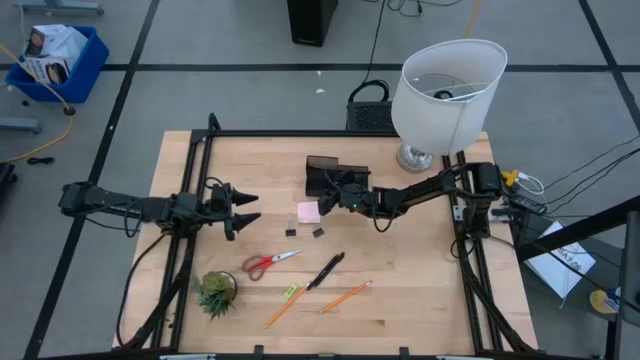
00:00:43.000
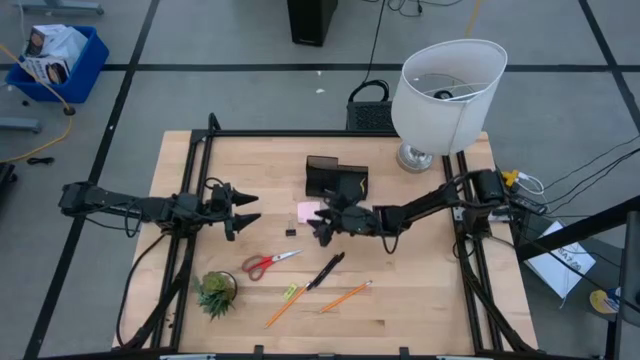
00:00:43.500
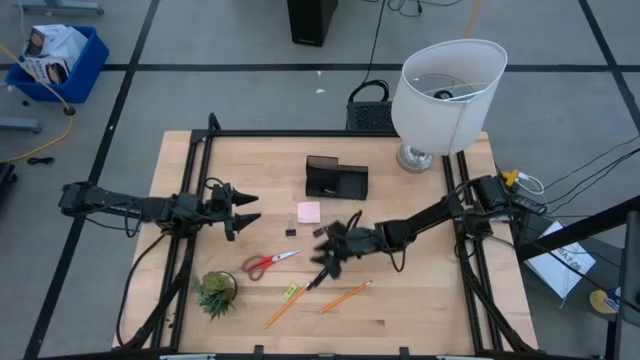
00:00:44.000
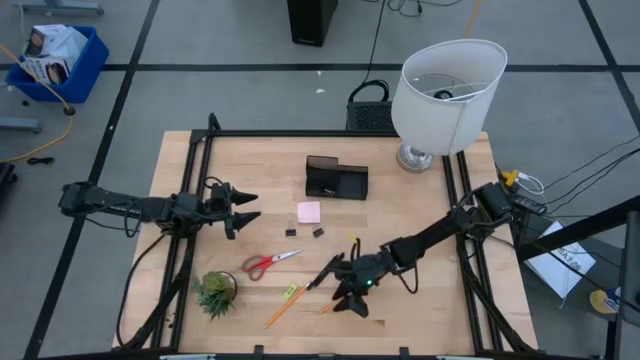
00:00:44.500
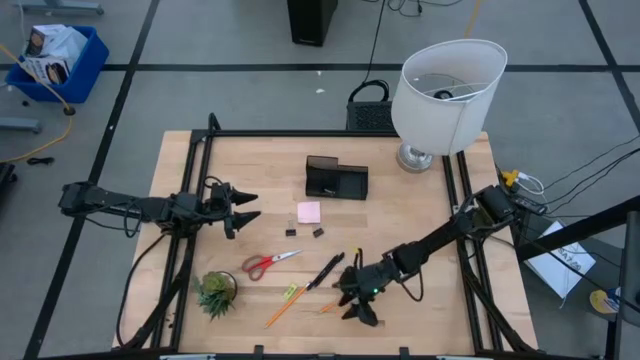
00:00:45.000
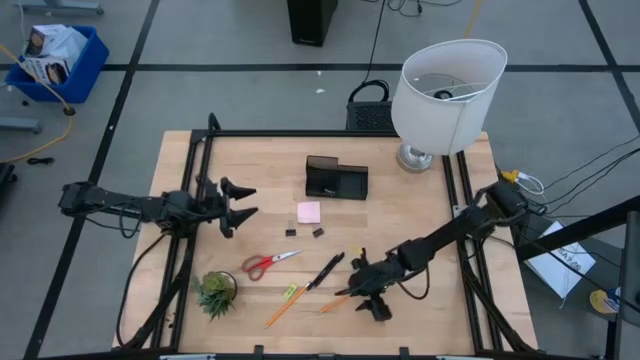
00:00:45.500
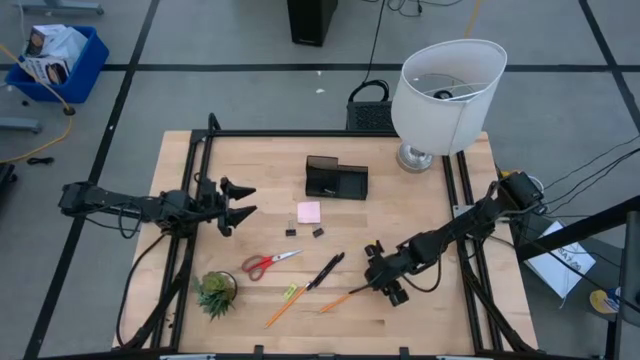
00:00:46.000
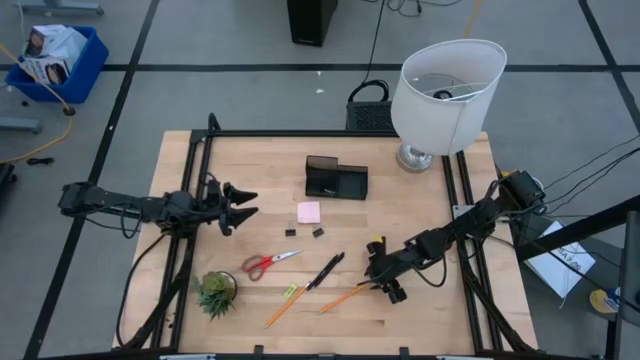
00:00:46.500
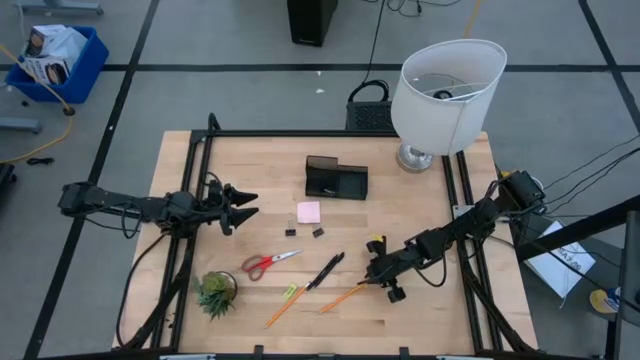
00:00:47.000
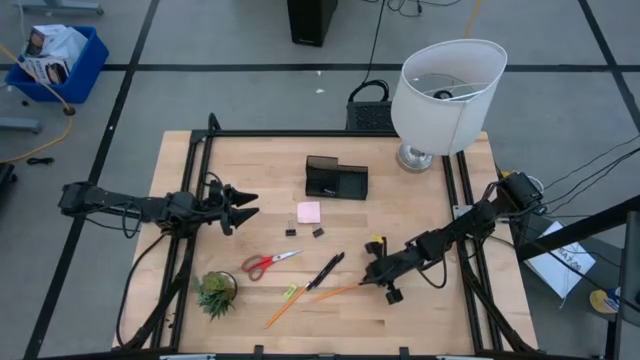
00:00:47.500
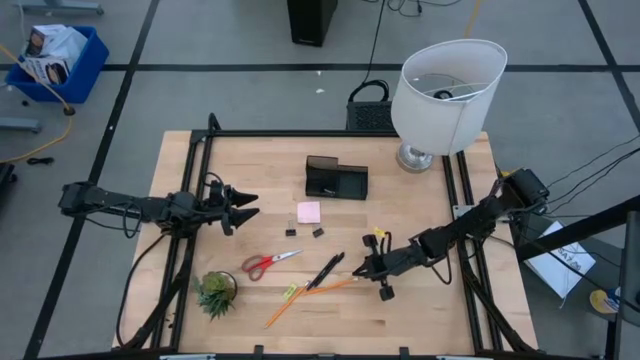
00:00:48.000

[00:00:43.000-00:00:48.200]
Task: Pick and place office supplies into organizer
Put the right yellow pencil into the desk organizer

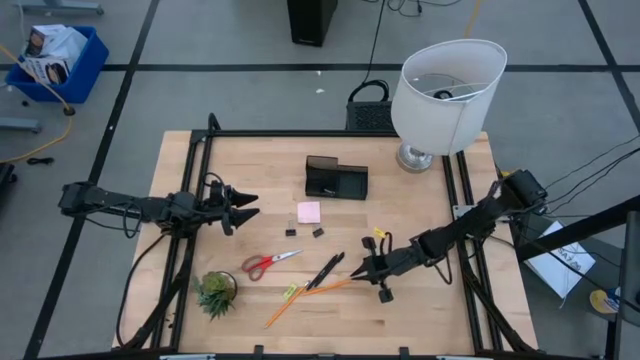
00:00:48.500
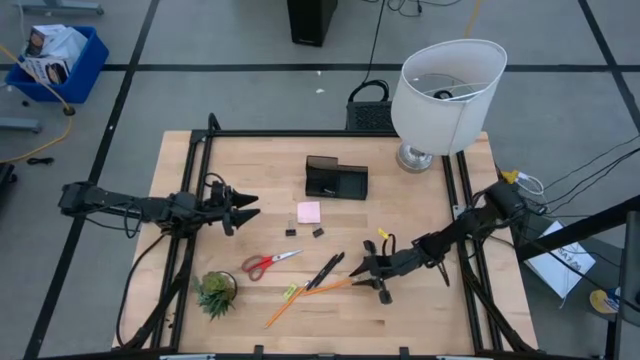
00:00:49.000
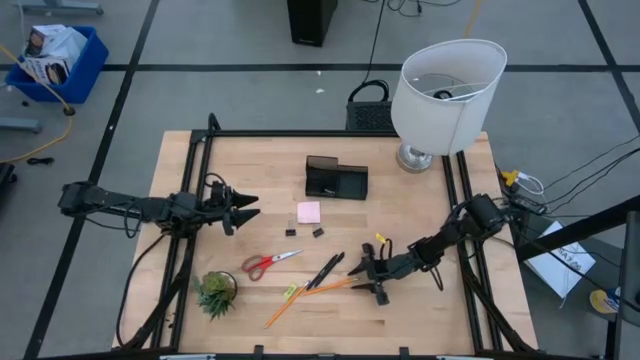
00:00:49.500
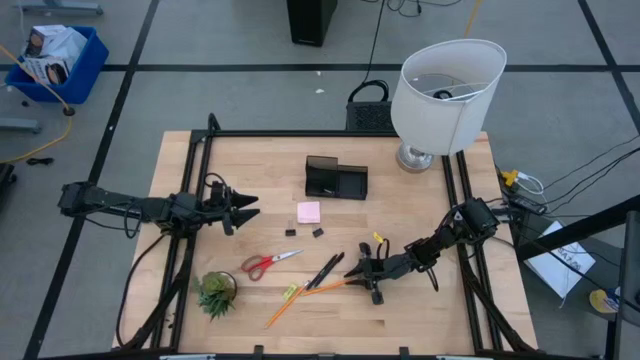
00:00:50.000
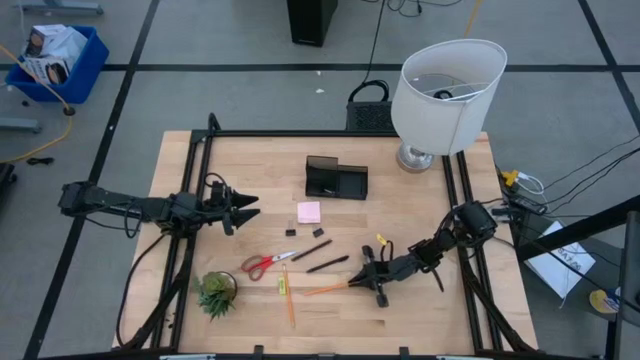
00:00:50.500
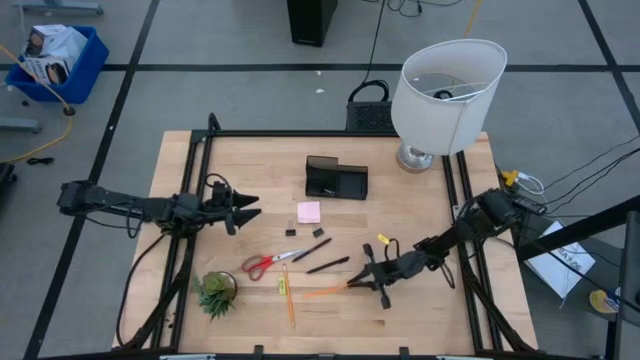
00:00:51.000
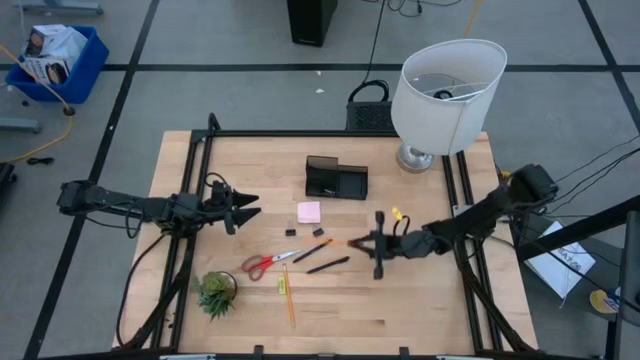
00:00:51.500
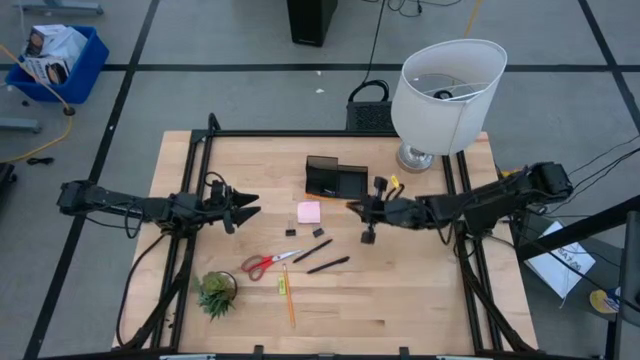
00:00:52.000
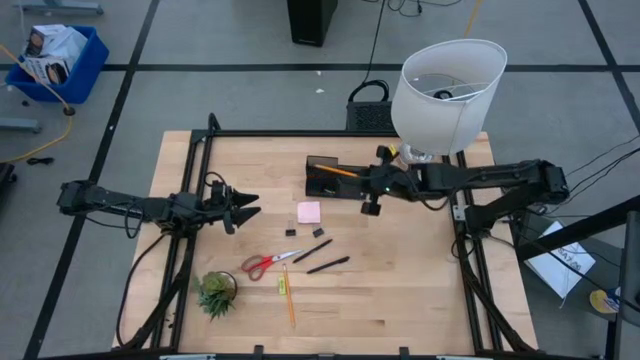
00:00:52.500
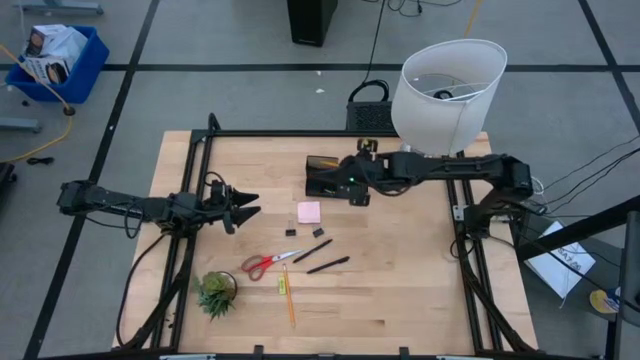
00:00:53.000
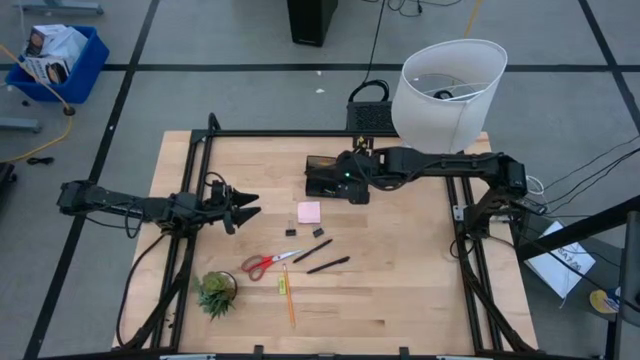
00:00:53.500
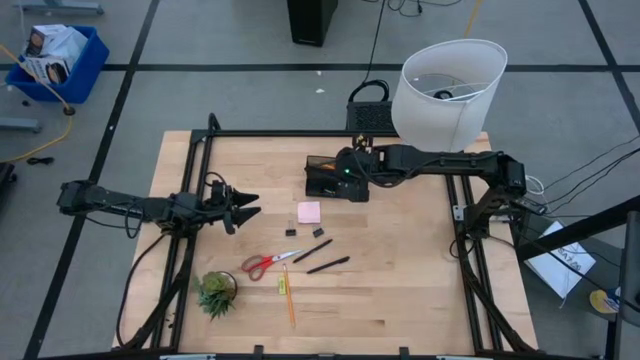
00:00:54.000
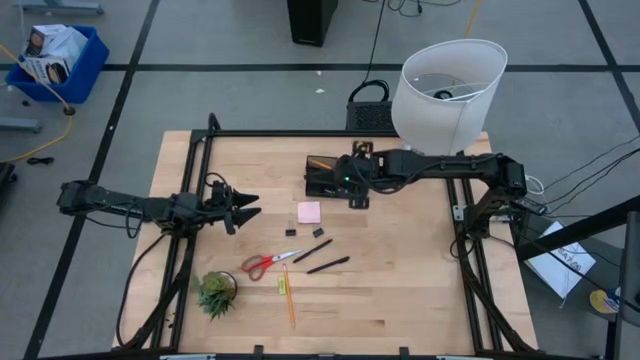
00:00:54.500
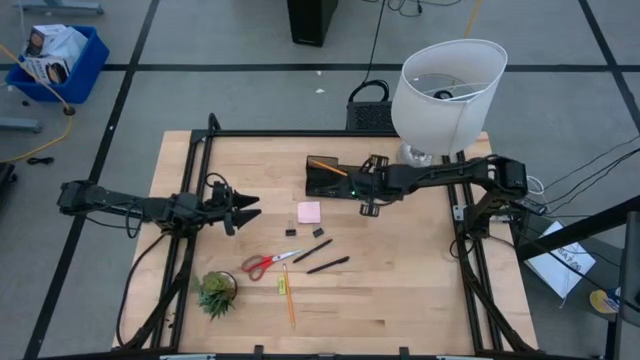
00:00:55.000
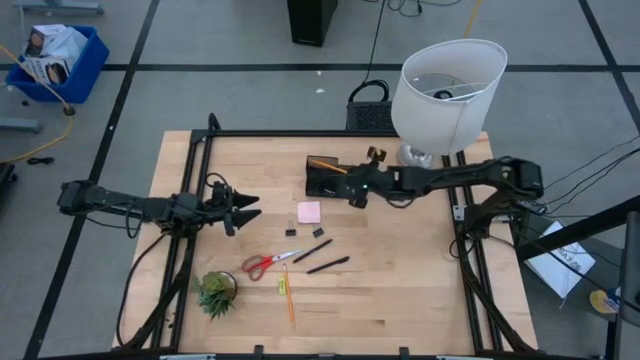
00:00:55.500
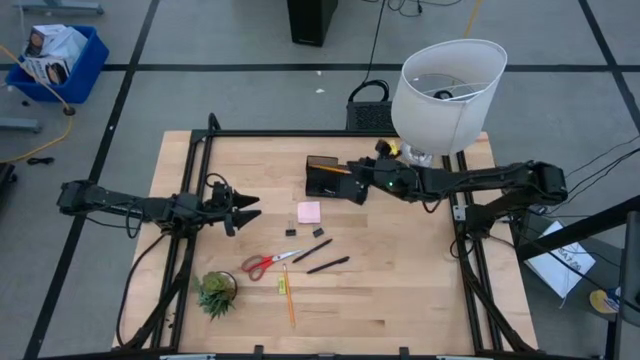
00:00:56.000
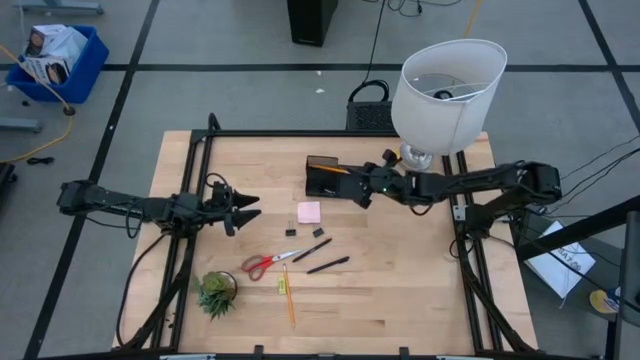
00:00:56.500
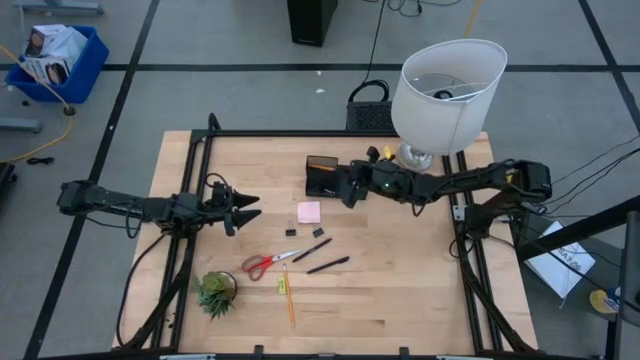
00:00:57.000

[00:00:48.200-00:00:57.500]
Put the right yellow pencil into the desk organizer

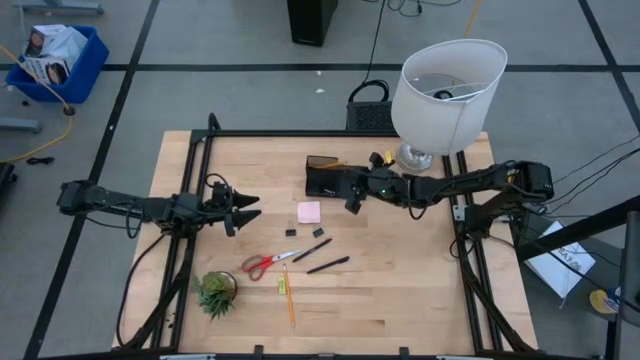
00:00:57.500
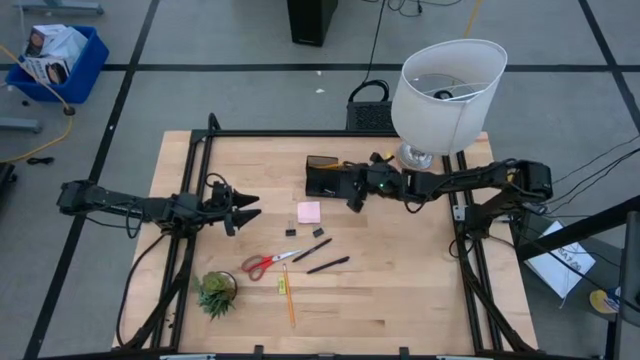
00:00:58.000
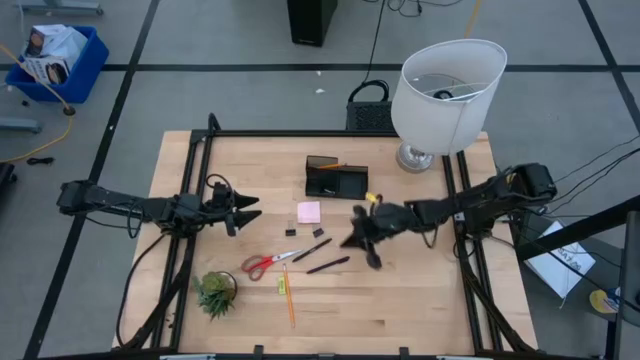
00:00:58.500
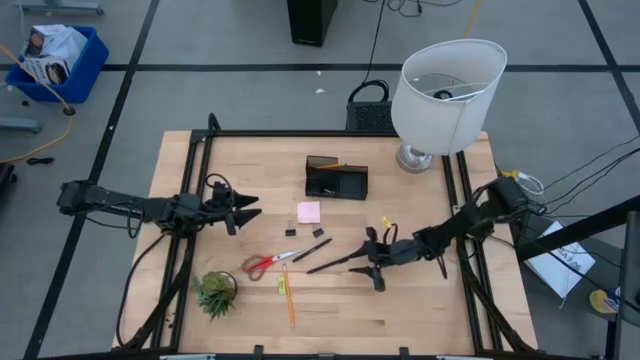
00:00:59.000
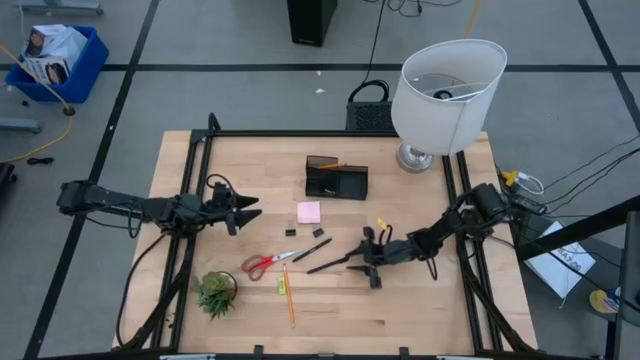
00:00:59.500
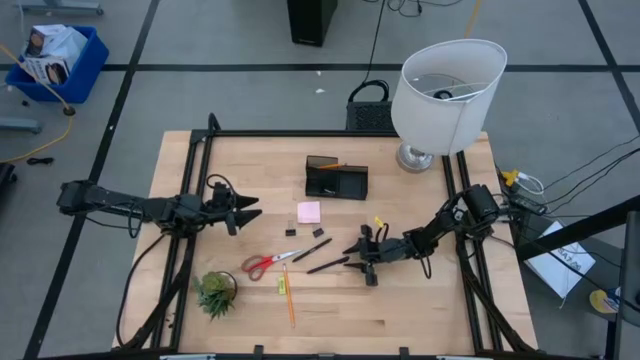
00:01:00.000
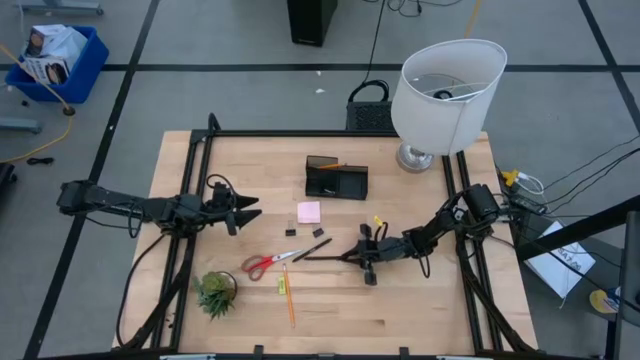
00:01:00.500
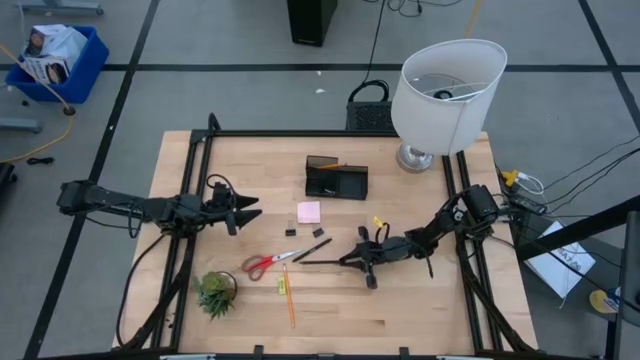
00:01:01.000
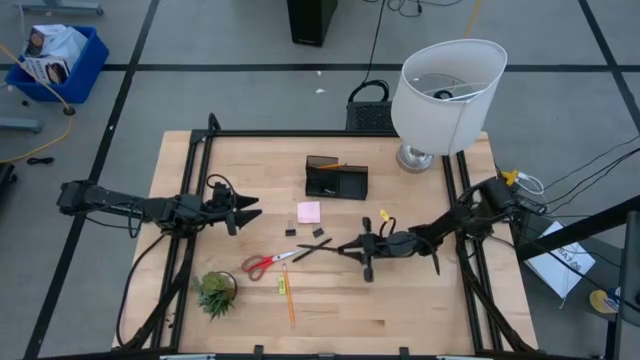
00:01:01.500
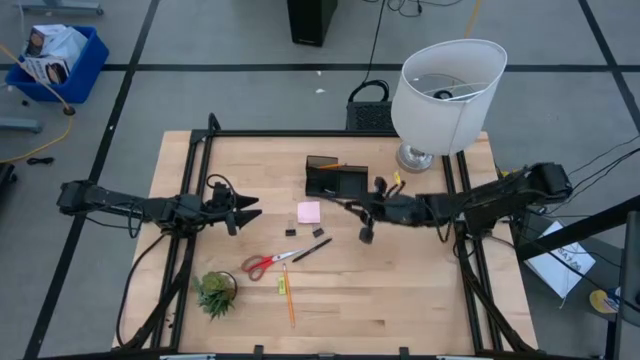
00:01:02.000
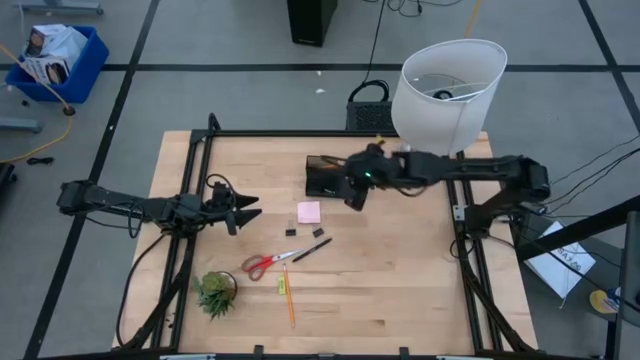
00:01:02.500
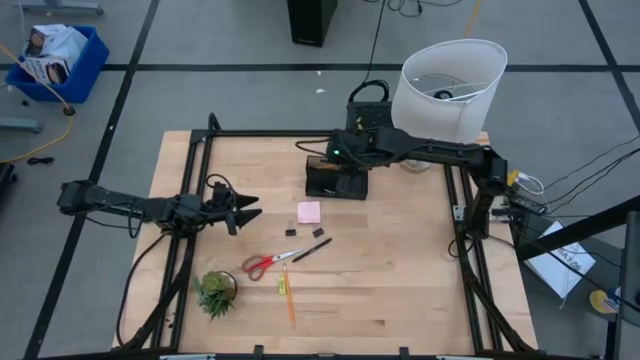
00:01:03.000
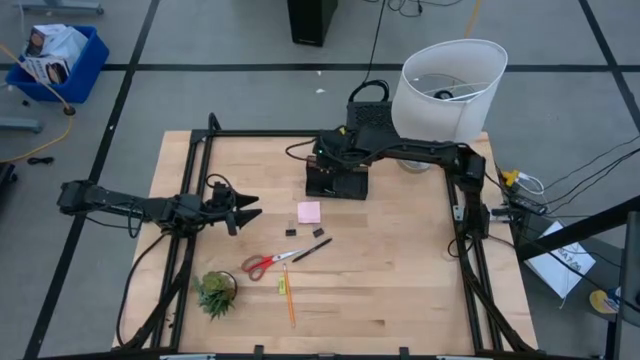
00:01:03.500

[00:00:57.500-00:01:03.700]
Put the bottom black ball pen into the desk organizer
